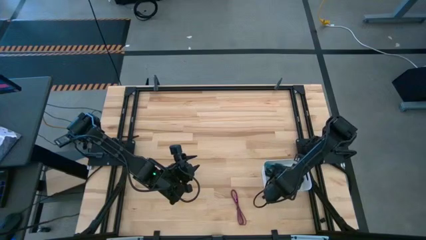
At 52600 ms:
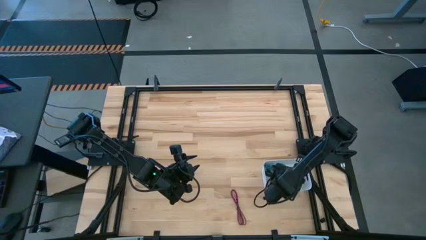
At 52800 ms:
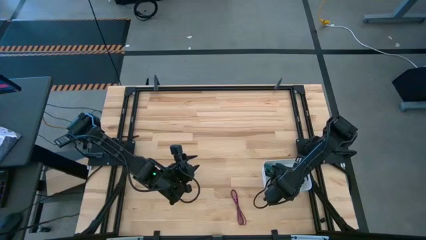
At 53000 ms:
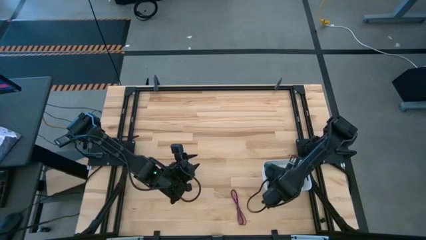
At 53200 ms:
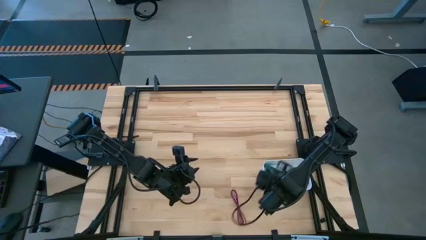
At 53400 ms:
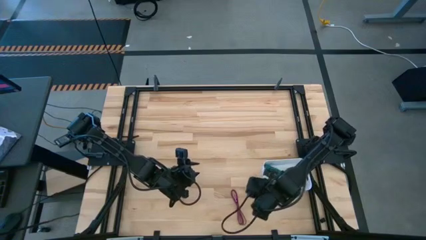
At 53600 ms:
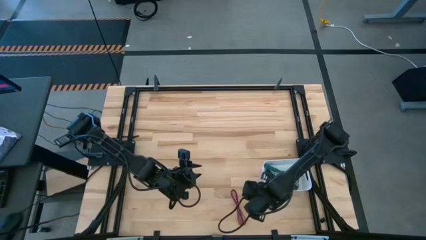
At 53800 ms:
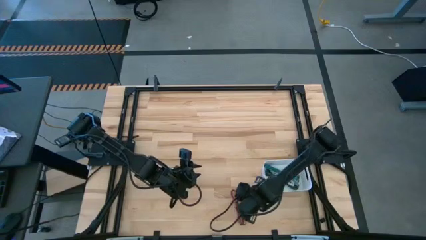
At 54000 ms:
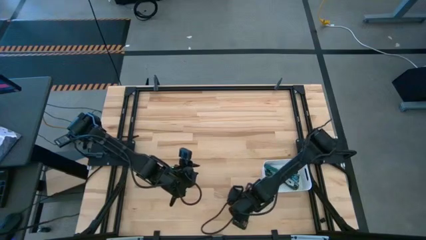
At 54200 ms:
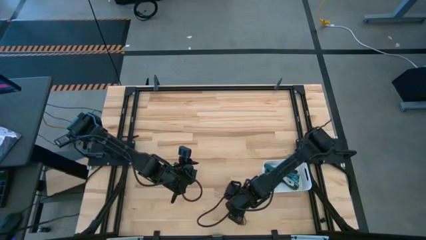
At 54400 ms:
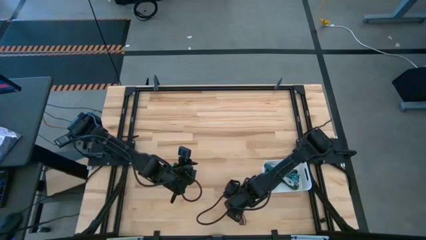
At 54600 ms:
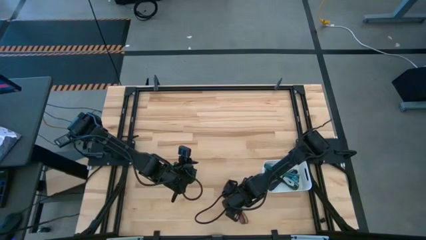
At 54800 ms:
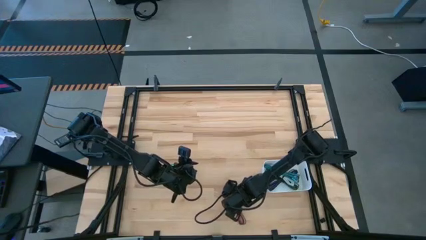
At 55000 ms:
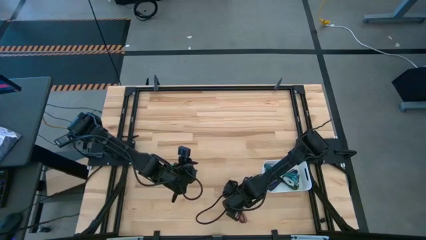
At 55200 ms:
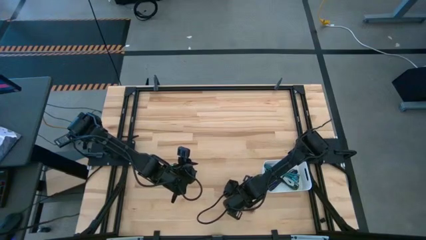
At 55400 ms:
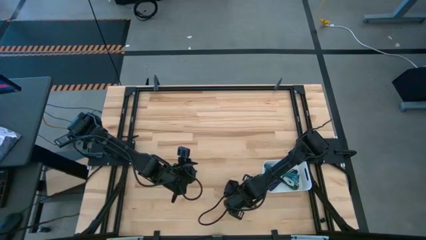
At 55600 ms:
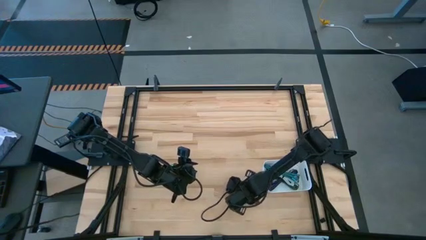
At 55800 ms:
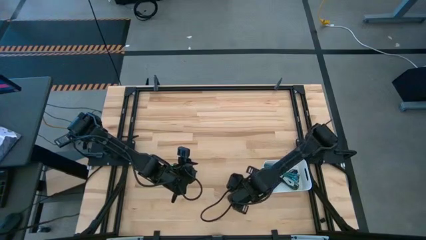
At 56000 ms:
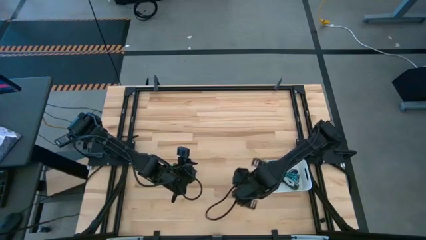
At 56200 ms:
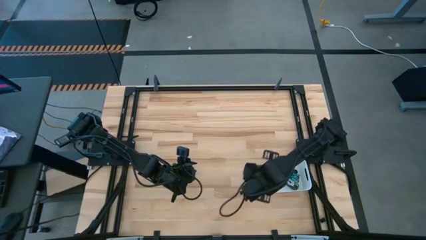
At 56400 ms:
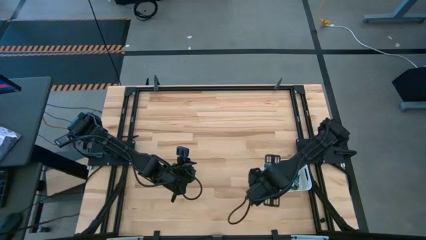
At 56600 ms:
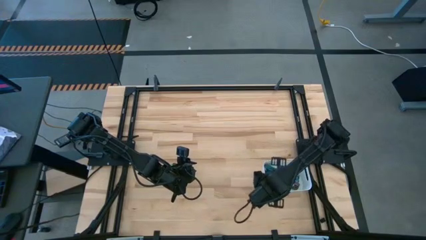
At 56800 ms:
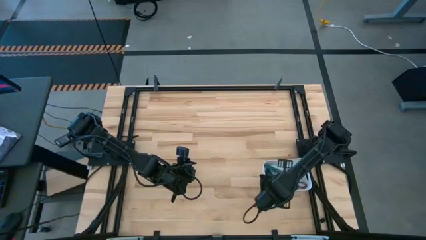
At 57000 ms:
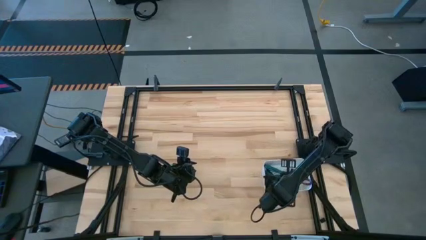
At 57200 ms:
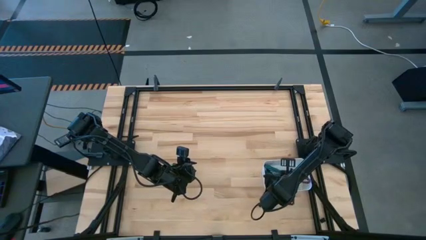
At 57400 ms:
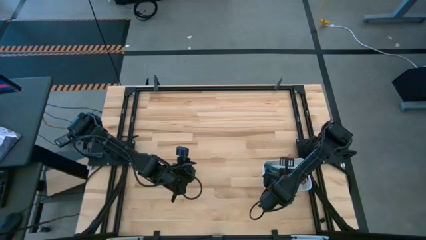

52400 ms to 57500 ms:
Task: Pick and place USB-C Cables
Put the pink charger cable into the white container

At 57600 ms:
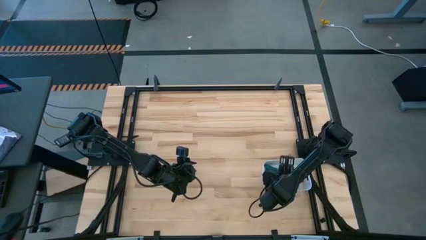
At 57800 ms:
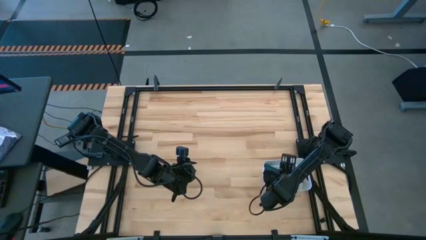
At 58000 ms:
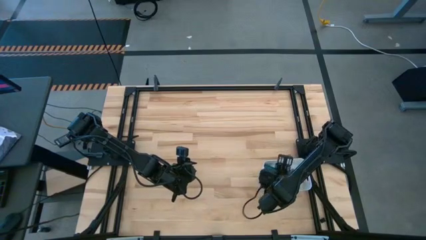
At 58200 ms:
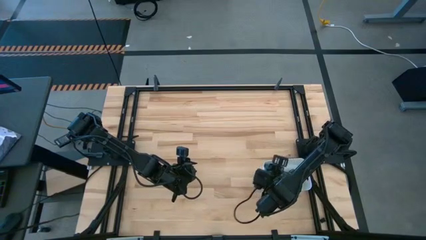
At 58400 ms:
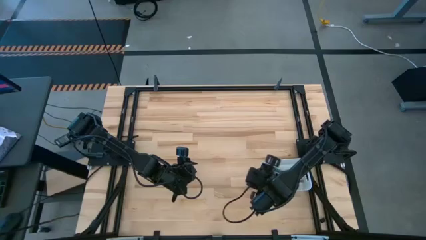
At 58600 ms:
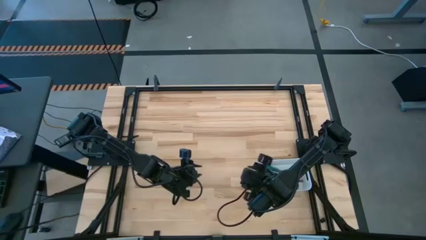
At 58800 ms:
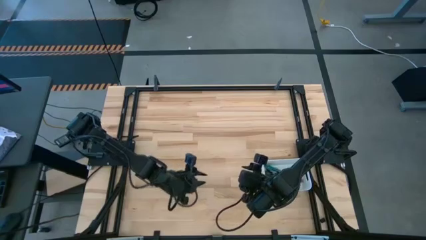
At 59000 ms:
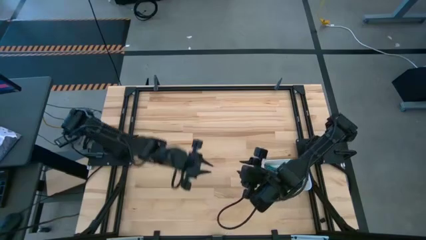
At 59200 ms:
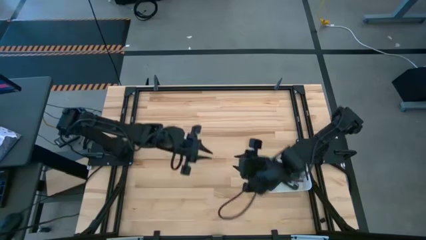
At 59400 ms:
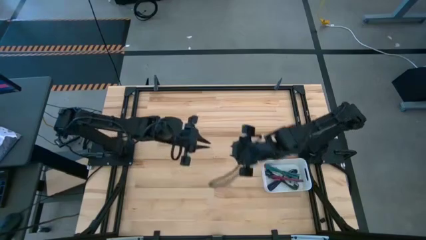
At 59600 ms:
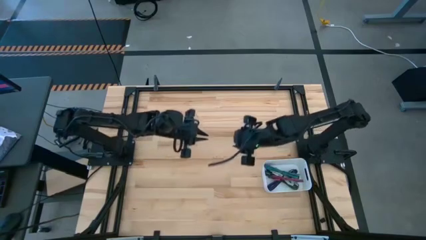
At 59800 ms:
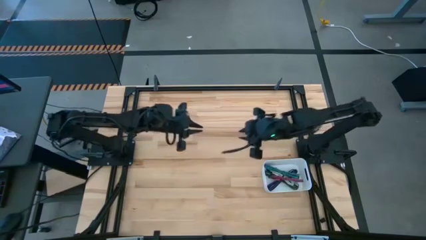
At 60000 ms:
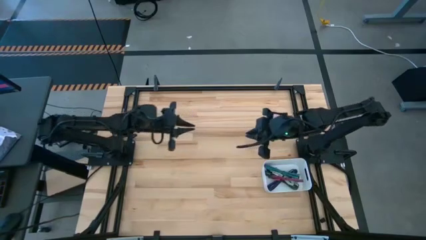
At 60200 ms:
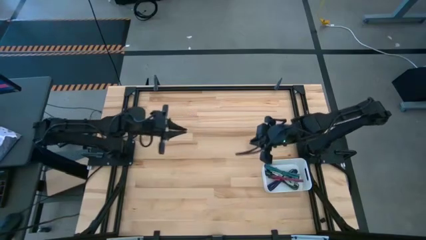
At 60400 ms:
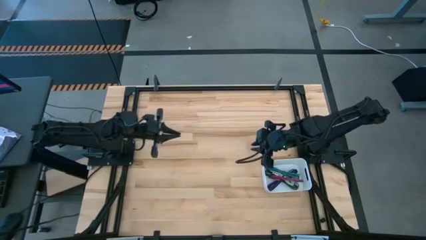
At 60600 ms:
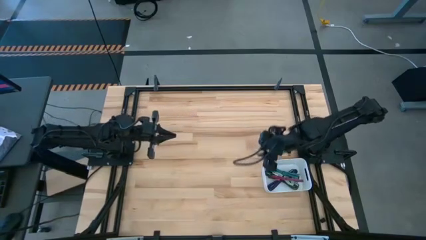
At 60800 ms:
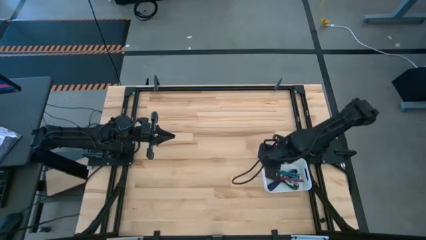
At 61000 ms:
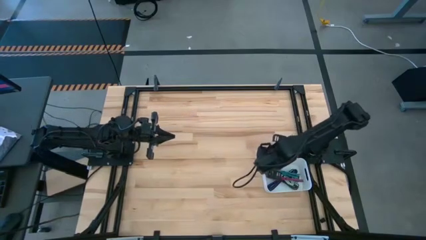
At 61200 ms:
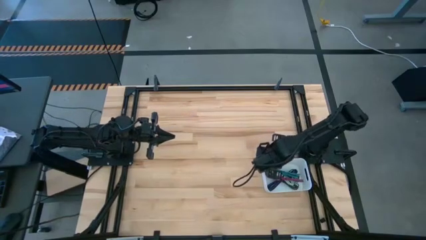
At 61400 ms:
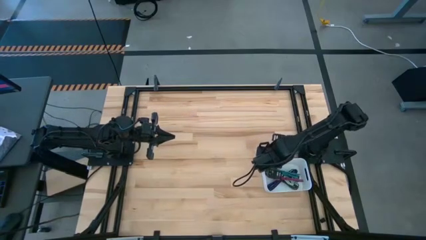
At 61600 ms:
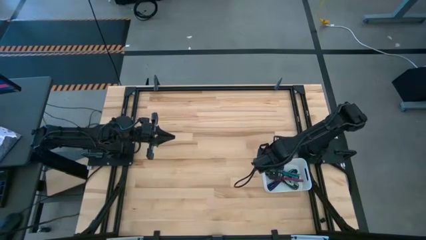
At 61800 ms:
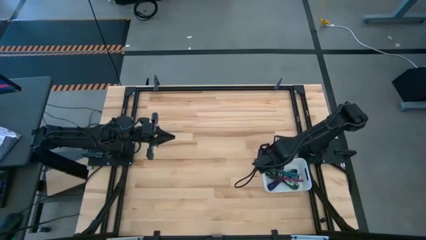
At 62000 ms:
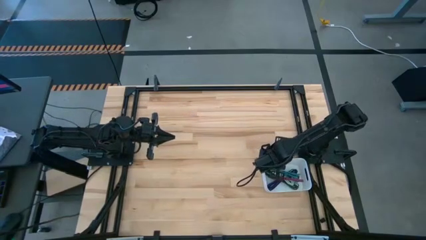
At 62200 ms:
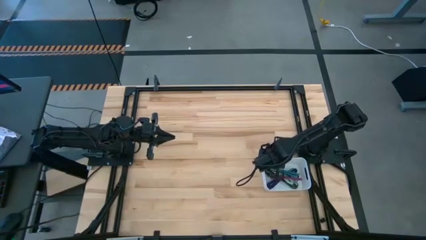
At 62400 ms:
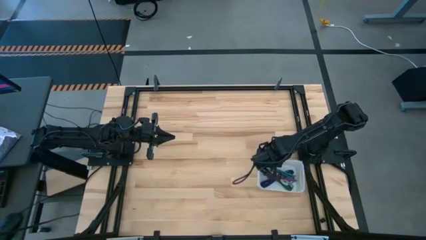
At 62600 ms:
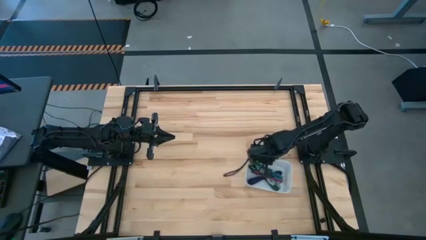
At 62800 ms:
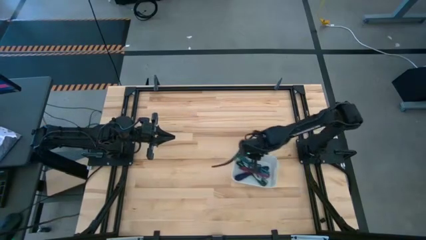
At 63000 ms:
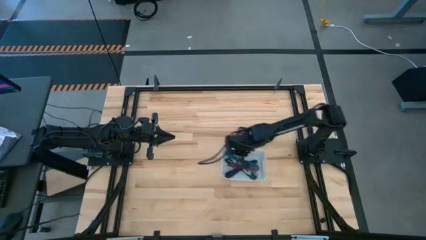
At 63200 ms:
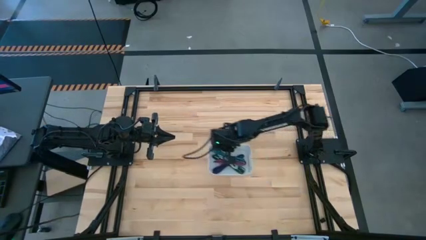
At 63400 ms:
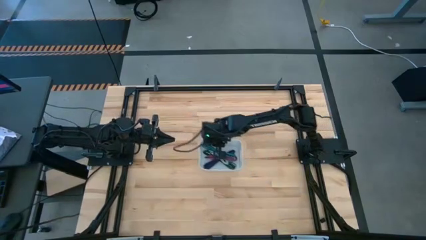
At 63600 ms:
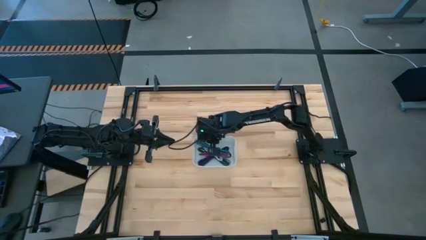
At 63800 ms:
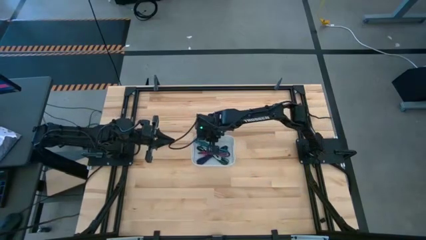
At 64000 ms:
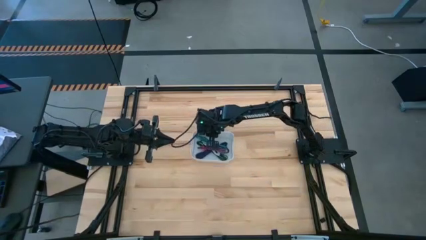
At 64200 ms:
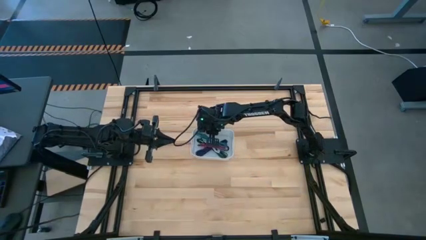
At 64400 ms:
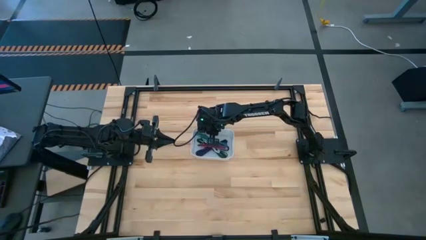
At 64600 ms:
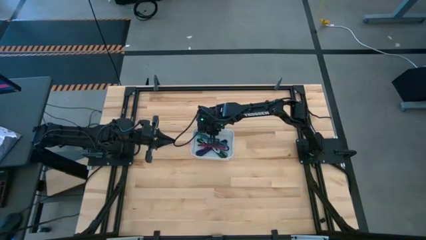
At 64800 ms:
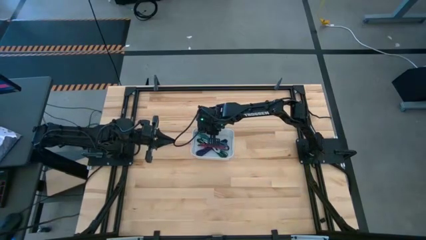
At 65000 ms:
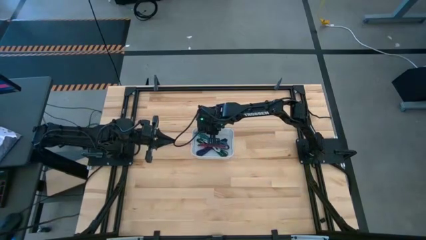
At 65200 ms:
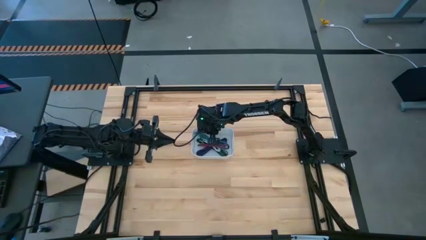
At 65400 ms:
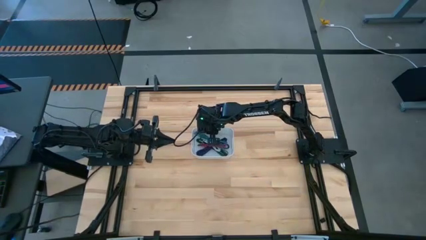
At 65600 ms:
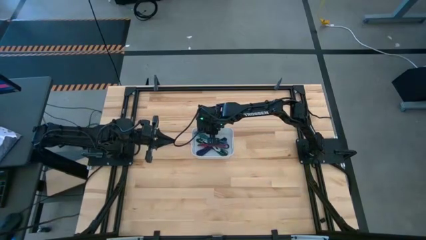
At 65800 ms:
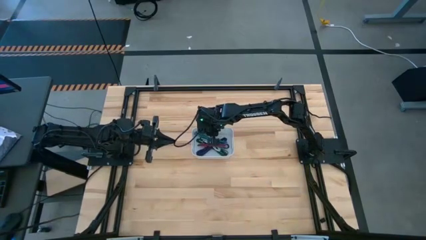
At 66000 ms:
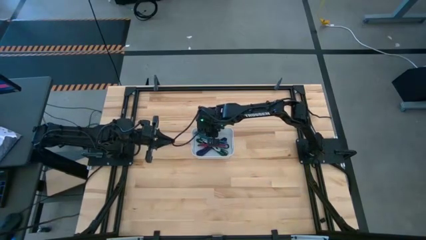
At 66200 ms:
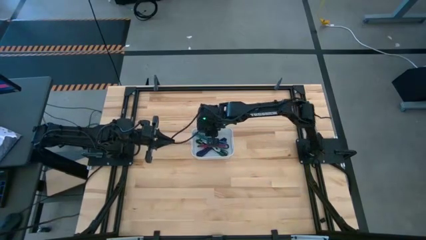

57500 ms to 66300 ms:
Move the white container to the center of the table
